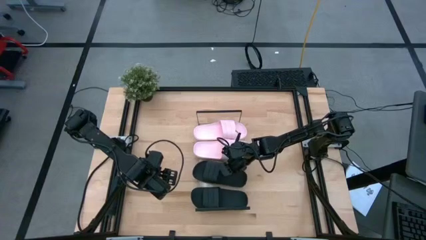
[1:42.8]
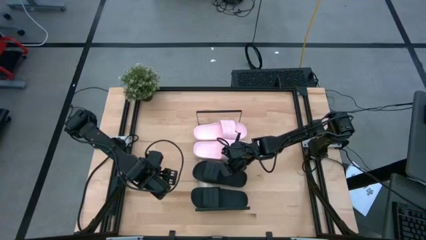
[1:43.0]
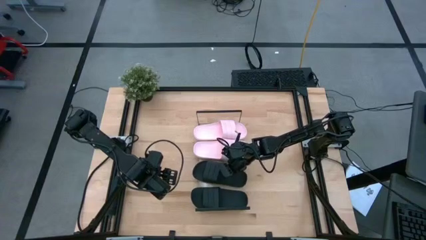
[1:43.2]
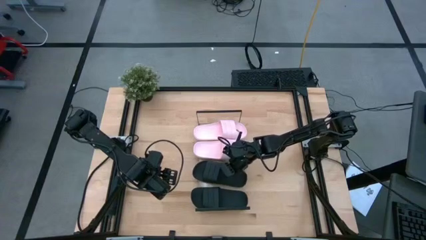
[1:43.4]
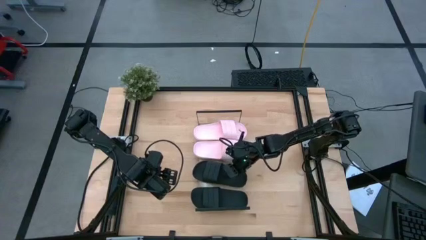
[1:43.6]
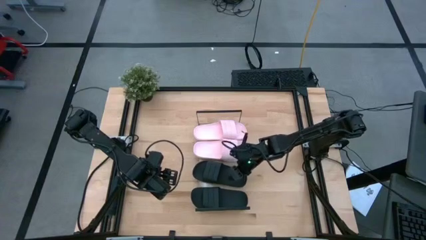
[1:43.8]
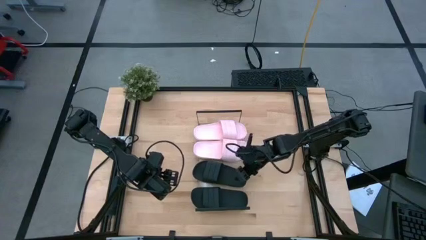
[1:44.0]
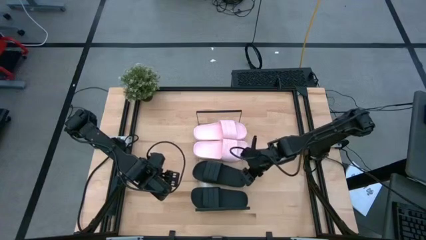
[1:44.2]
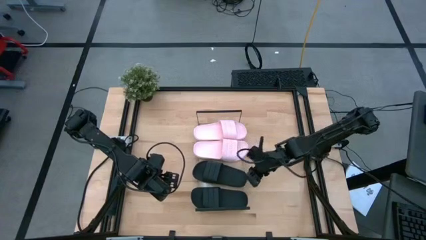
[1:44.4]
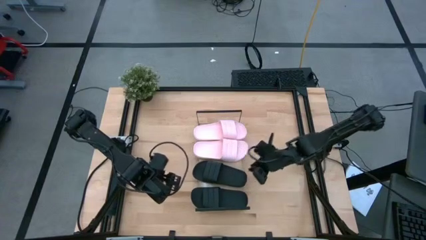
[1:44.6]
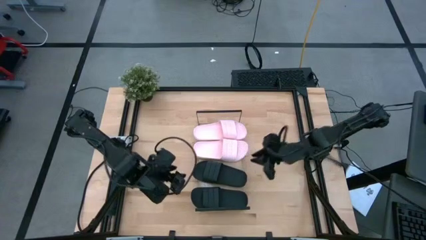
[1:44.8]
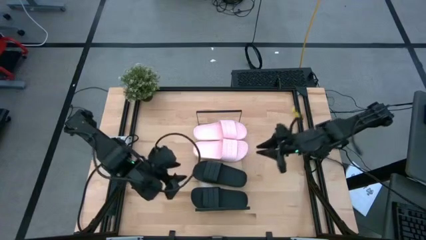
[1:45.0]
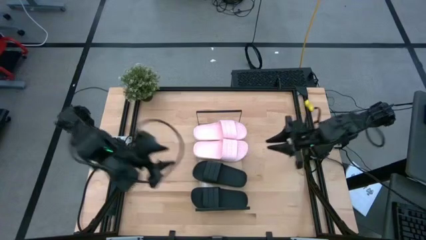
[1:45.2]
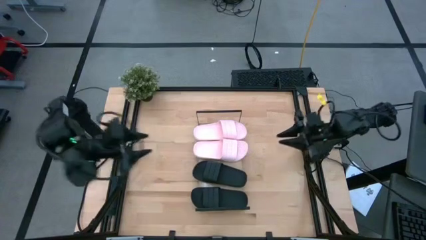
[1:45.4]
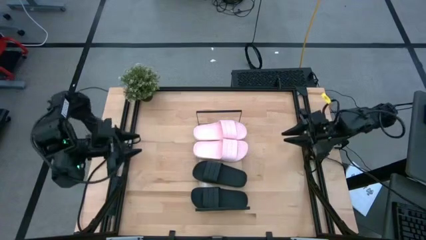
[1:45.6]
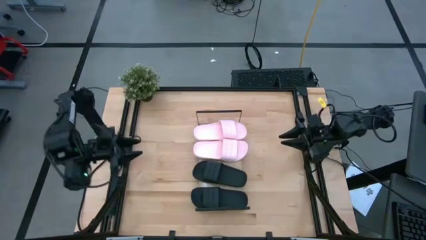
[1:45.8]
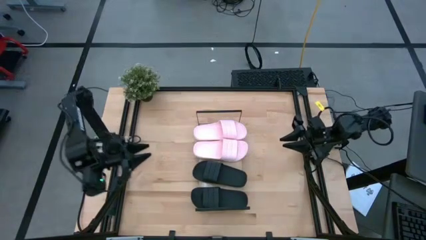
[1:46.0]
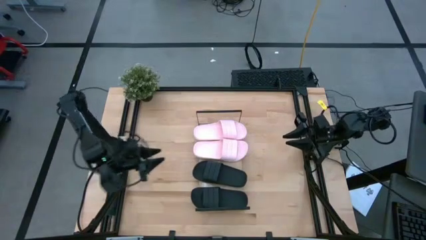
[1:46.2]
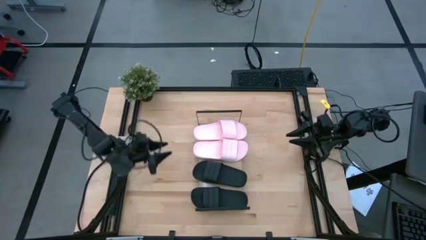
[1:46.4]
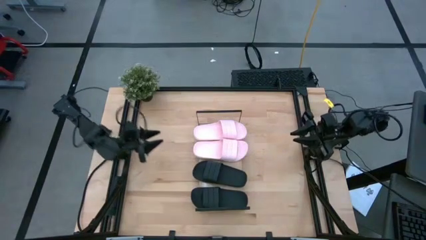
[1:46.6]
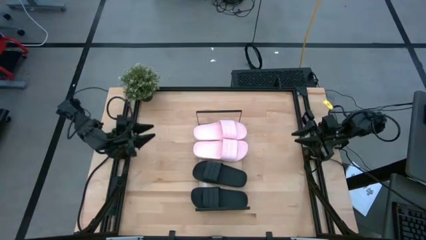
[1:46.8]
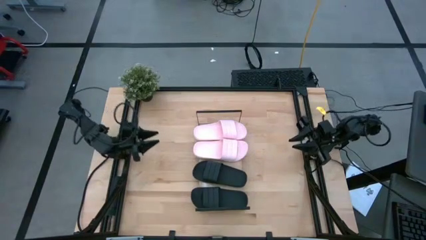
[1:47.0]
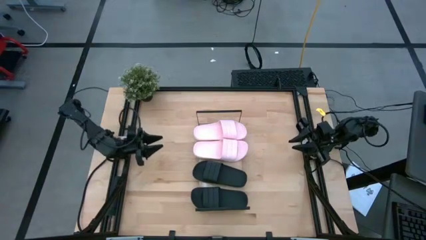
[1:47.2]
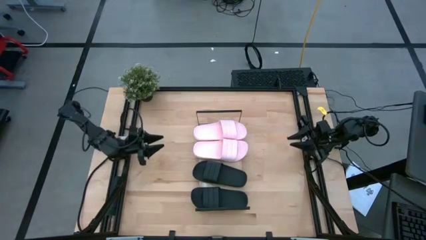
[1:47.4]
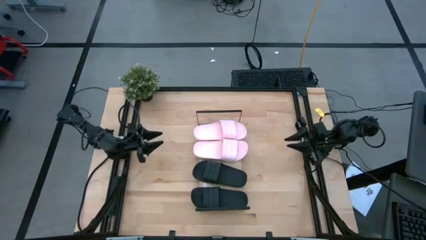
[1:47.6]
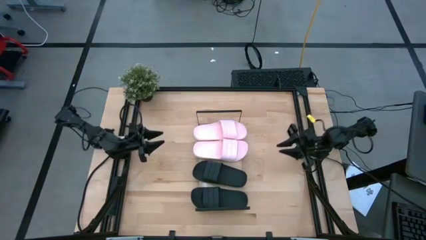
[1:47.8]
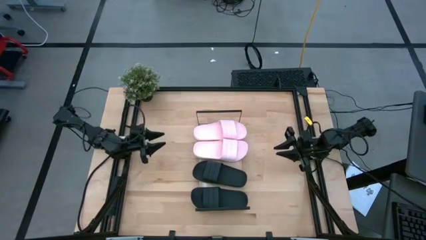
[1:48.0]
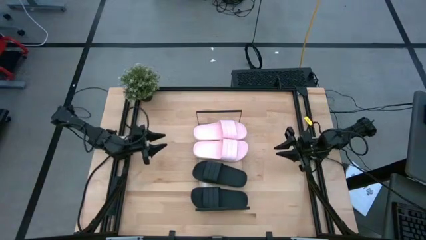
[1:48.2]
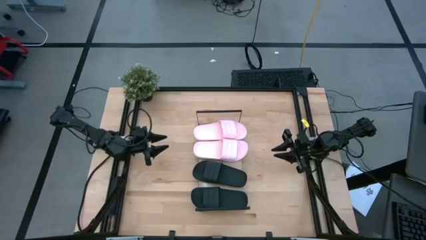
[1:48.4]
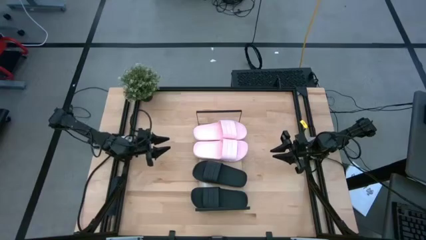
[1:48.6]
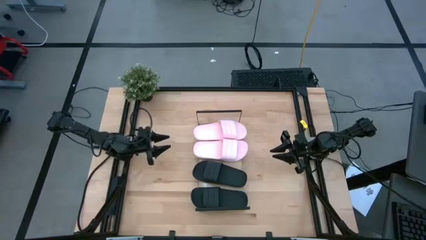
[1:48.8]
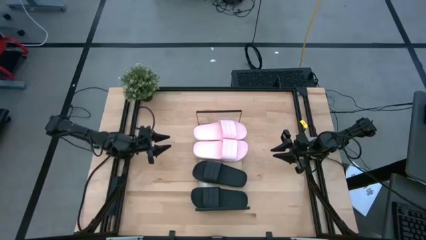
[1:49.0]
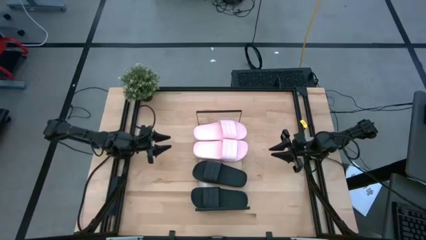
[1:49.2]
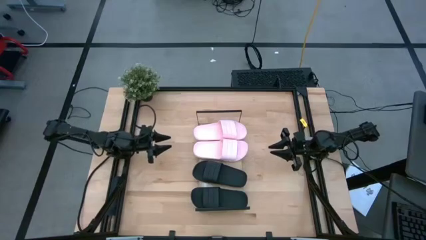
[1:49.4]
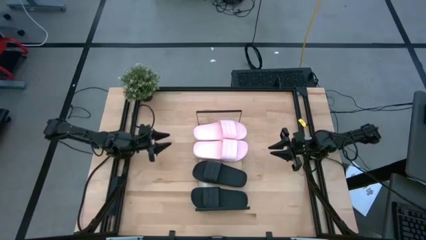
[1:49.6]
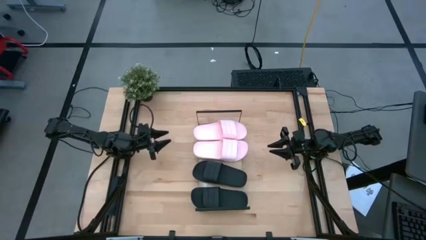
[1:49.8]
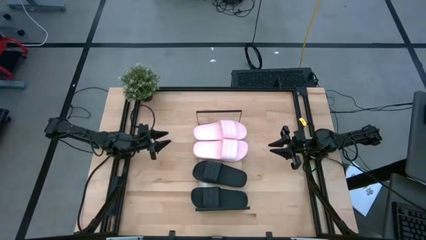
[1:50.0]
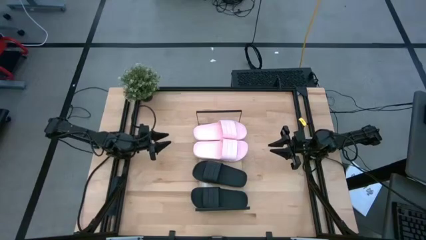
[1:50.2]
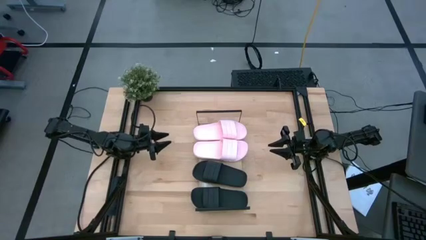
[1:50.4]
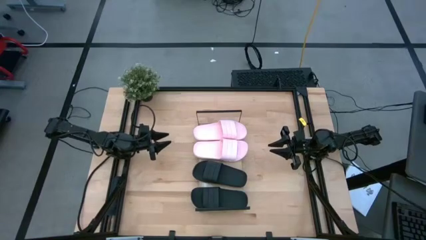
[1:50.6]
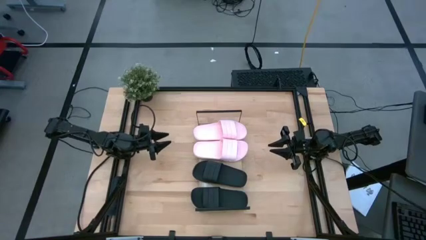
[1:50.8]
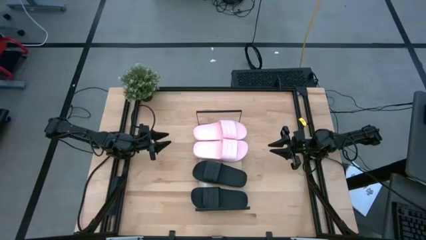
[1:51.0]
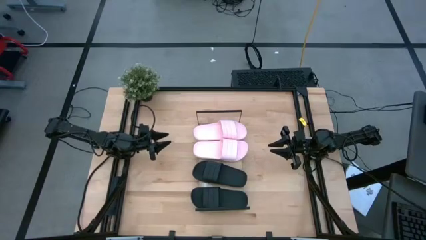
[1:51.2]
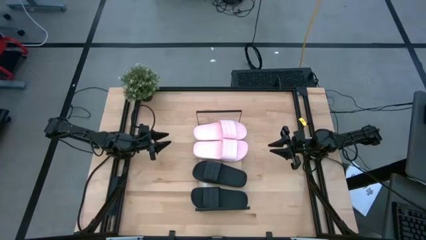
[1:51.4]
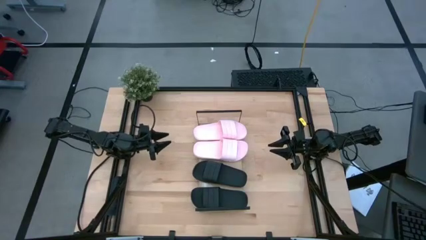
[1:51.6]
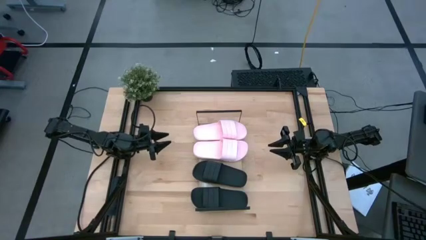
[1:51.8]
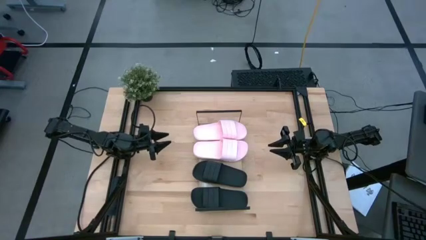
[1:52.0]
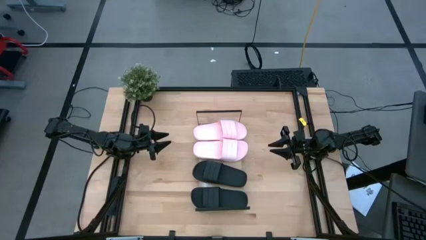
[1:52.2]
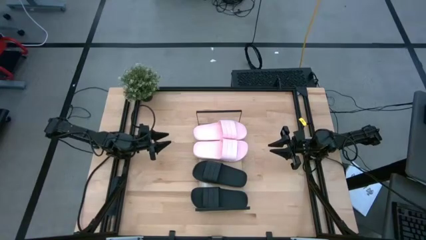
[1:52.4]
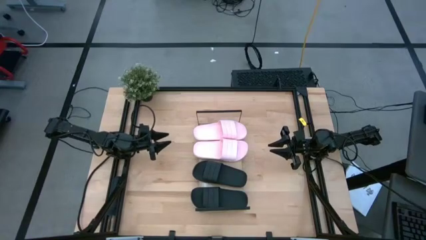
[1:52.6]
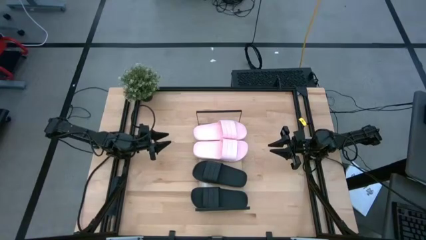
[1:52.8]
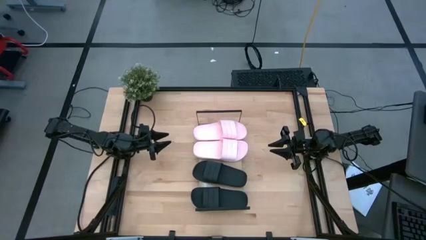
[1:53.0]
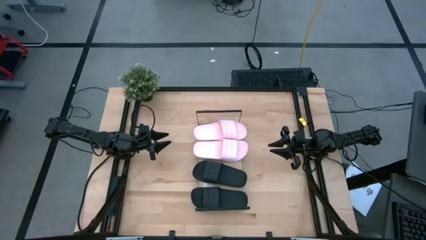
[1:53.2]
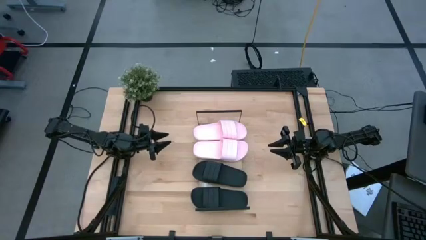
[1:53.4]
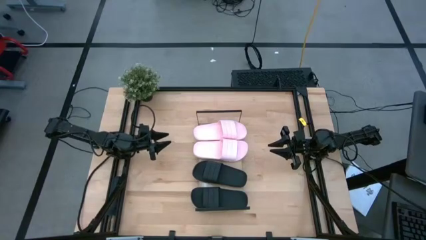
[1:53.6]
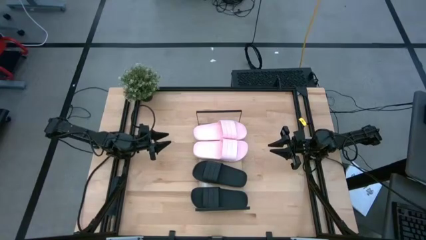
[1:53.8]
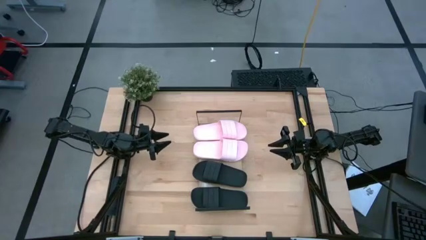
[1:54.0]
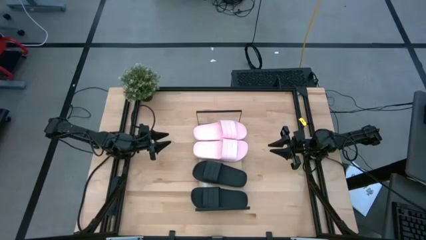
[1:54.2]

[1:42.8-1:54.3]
Task: Pick and place slides into the shelf
Return to Home Position

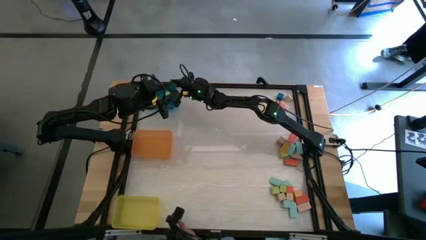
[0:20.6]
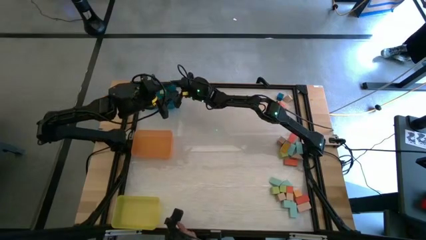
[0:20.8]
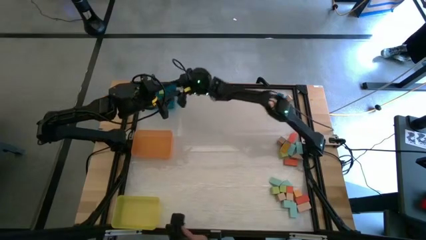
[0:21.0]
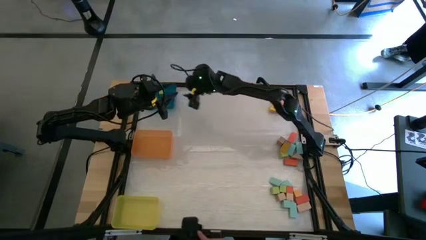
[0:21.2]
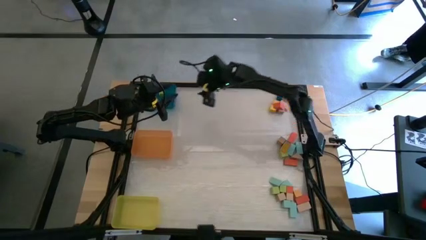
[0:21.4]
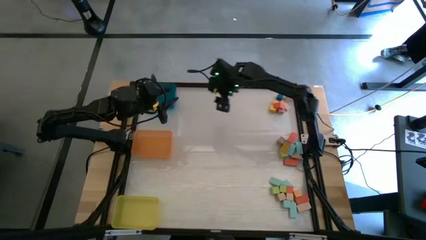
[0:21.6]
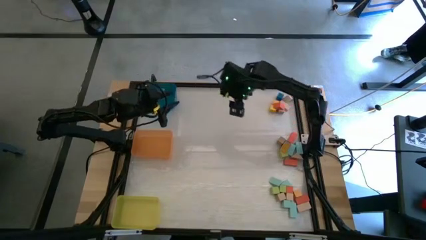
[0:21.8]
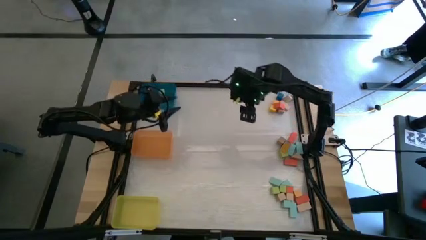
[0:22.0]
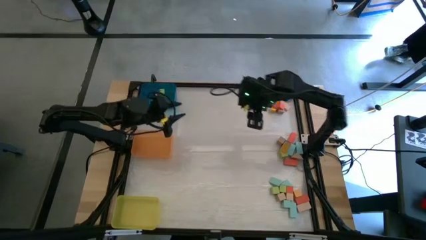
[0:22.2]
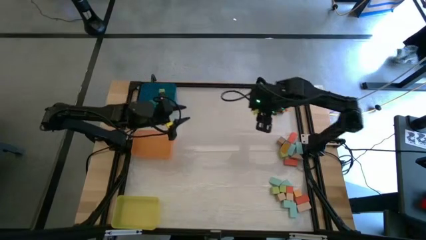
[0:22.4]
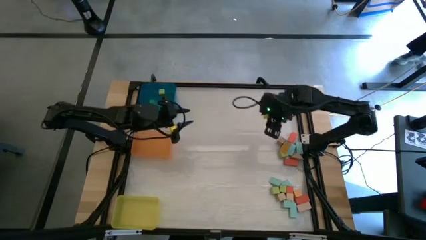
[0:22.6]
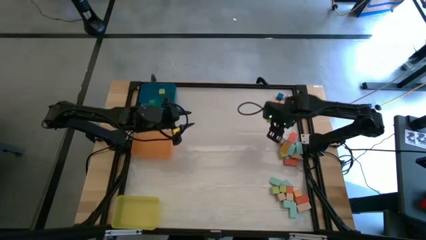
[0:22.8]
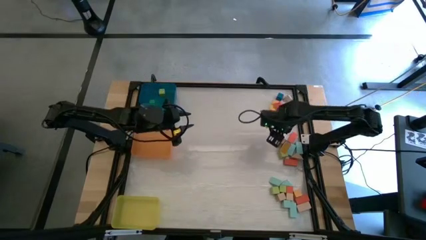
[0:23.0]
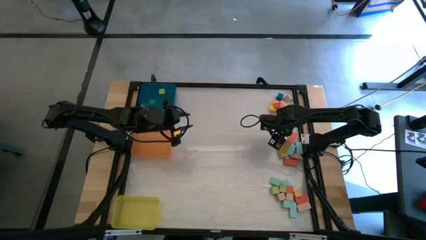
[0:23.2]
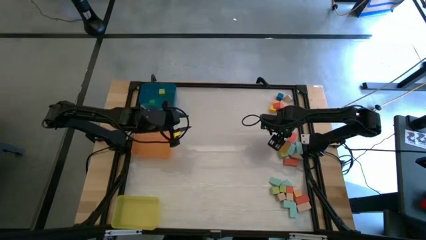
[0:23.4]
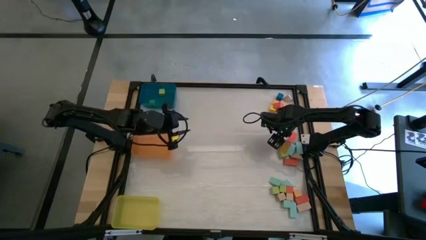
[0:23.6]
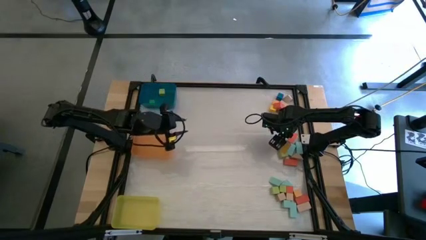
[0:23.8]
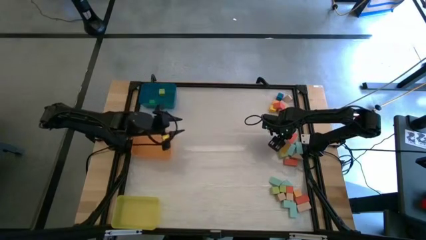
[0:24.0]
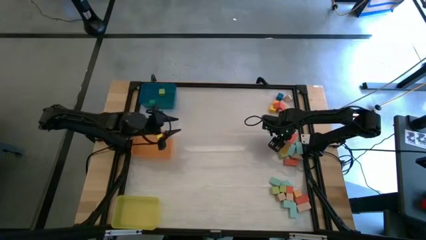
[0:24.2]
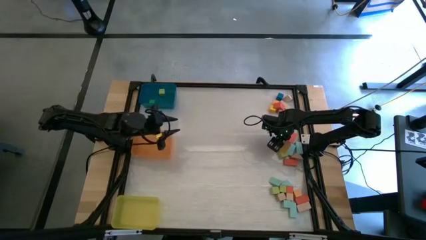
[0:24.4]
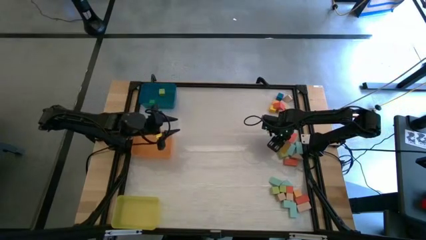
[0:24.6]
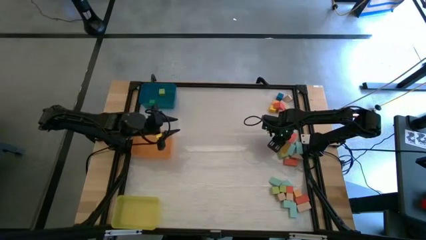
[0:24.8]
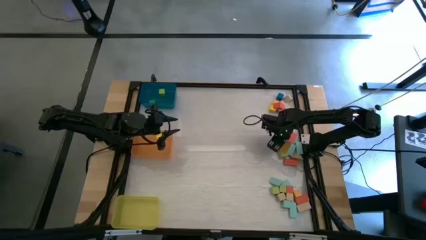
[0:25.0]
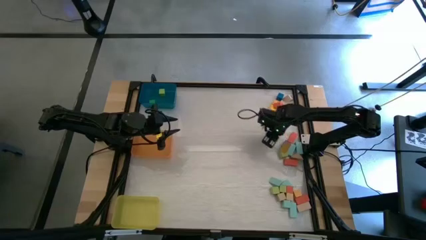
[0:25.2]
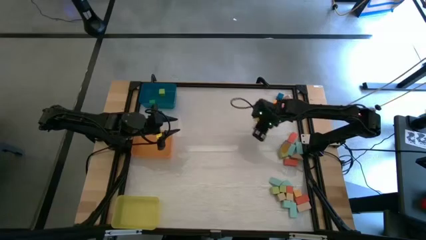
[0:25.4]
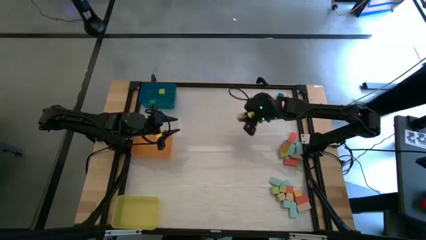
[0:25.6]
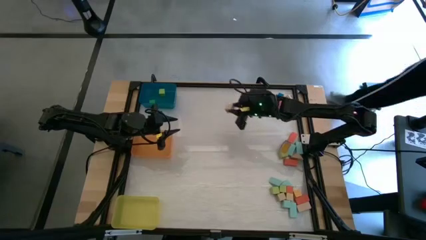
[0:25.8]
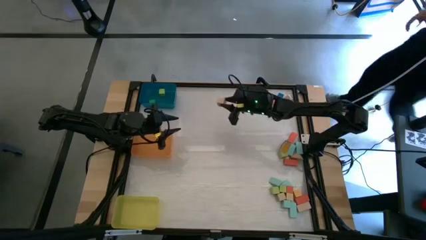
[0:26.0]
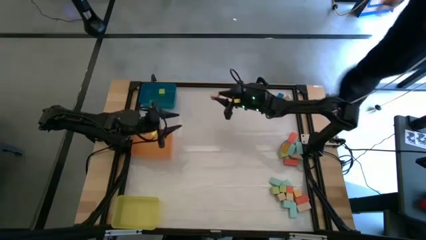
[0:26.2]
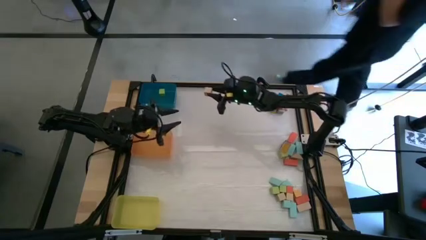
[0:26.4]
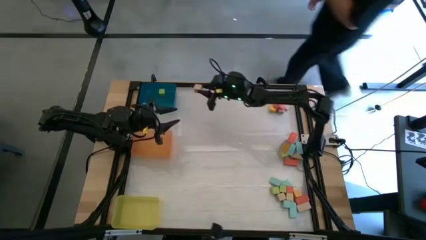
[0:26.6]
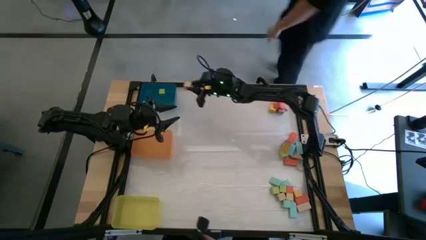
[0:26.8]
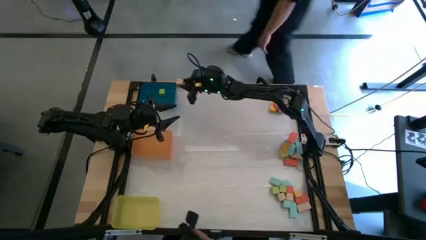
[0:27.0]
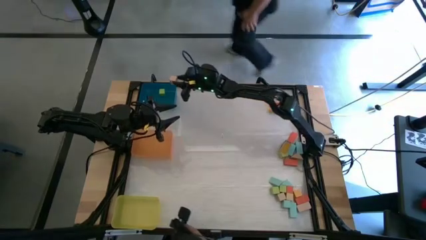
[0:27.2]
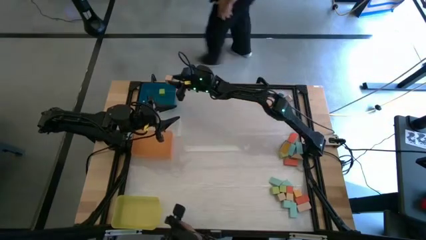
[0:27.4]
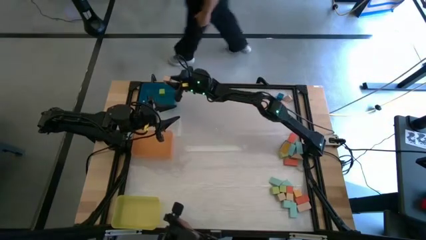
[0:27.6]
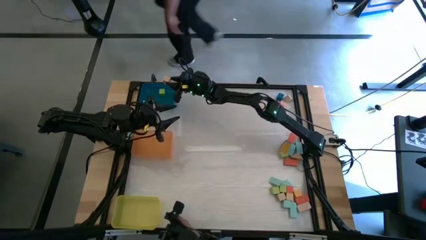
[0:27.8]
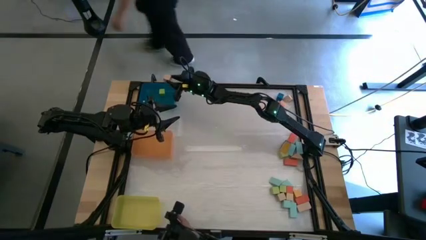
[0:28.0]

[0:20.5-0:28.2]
Task: Sort blocks by size
Put the light brown cube block into the blue bin
